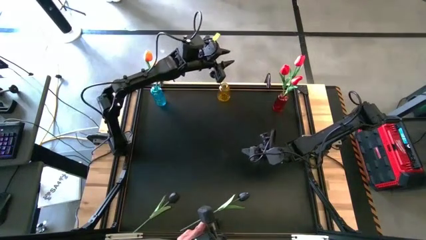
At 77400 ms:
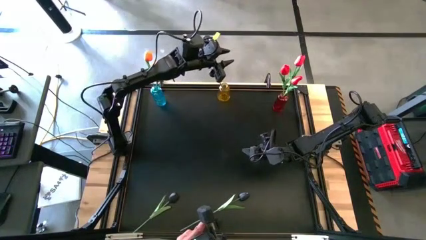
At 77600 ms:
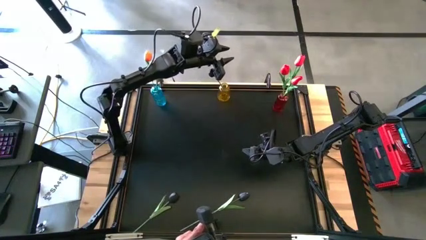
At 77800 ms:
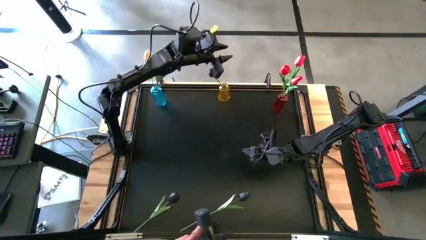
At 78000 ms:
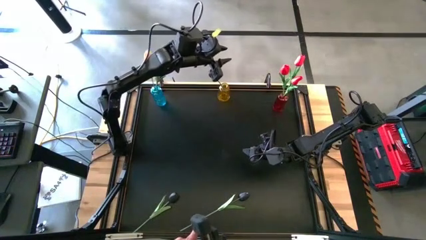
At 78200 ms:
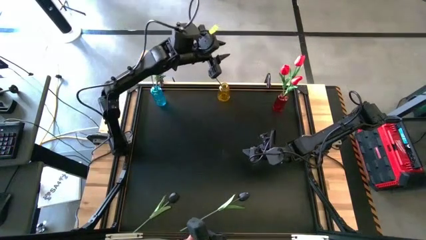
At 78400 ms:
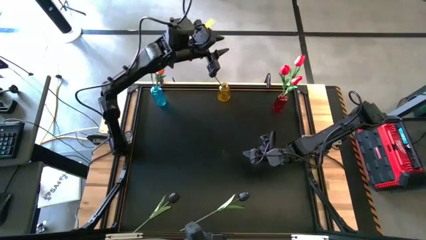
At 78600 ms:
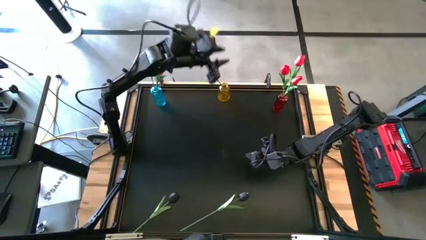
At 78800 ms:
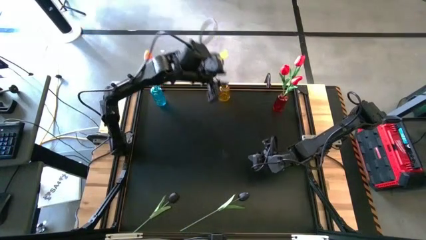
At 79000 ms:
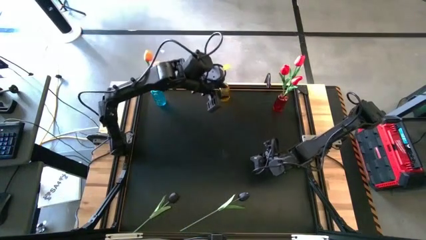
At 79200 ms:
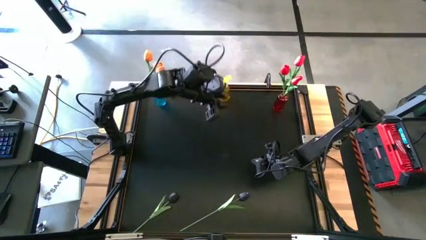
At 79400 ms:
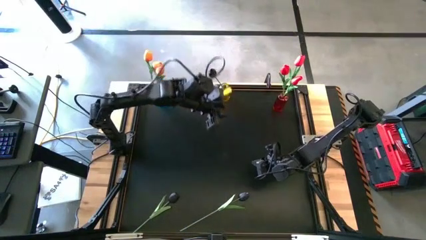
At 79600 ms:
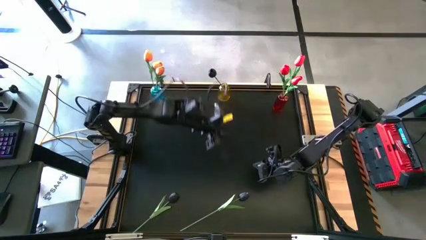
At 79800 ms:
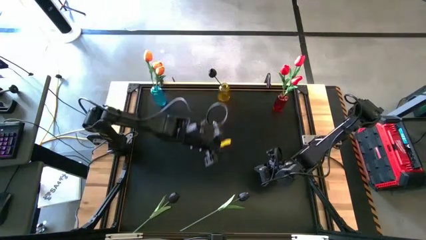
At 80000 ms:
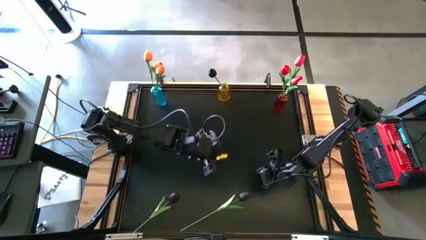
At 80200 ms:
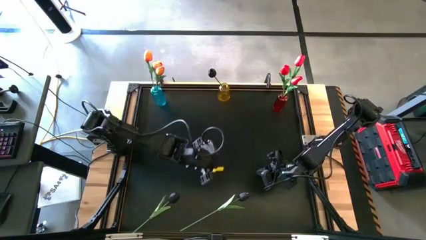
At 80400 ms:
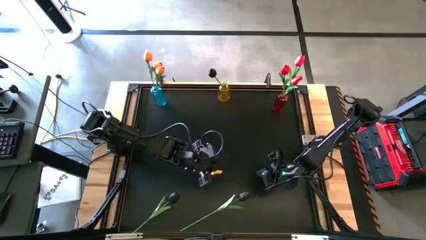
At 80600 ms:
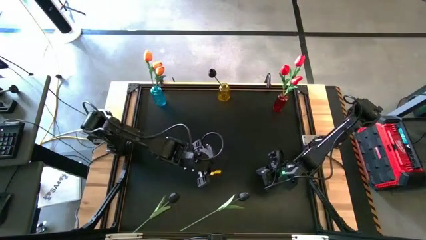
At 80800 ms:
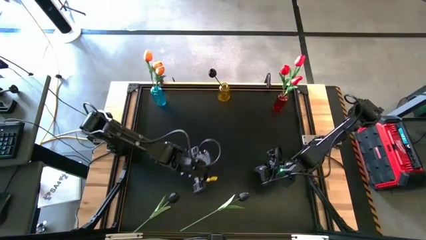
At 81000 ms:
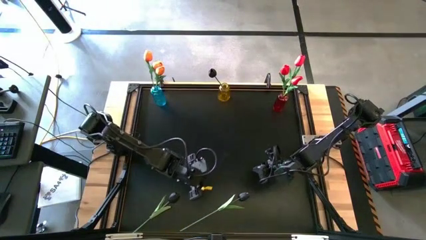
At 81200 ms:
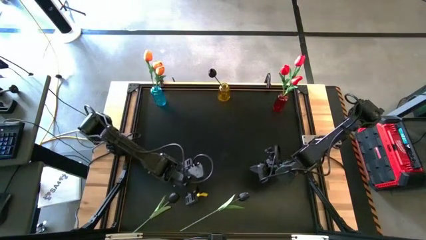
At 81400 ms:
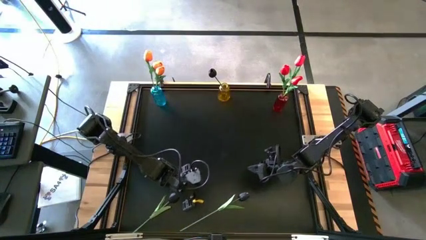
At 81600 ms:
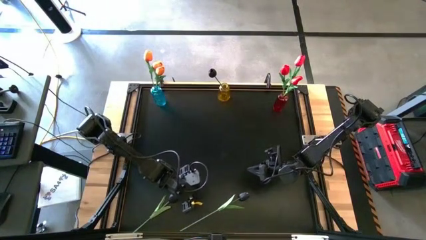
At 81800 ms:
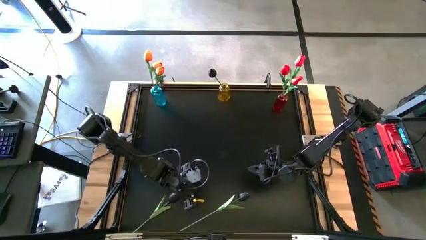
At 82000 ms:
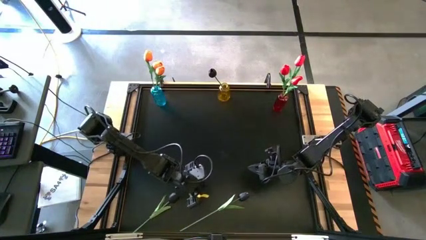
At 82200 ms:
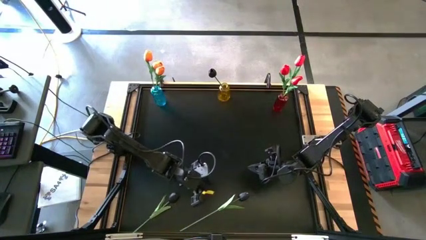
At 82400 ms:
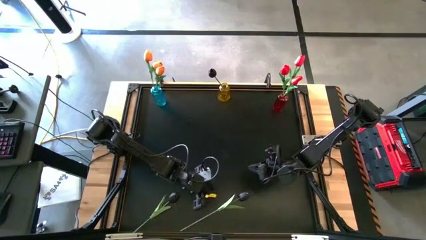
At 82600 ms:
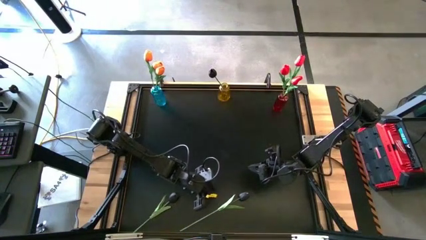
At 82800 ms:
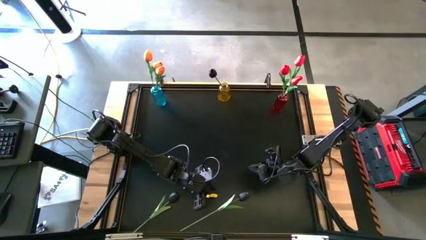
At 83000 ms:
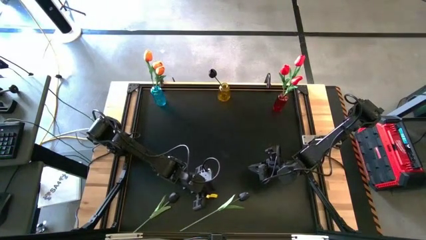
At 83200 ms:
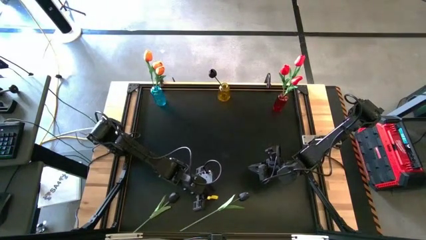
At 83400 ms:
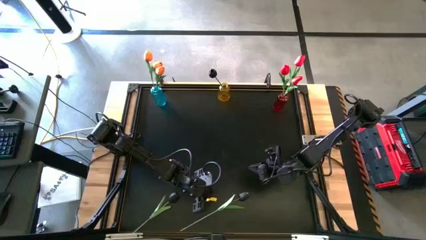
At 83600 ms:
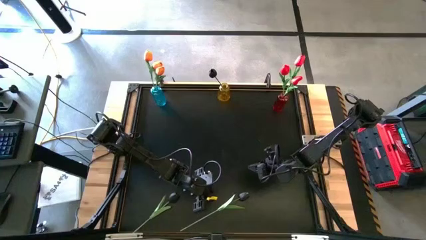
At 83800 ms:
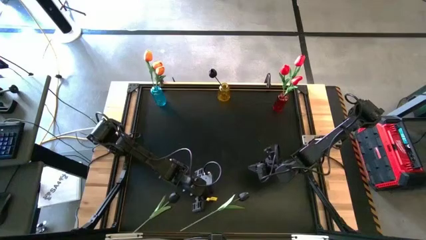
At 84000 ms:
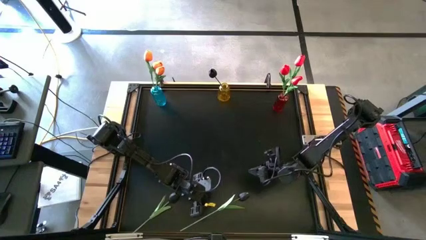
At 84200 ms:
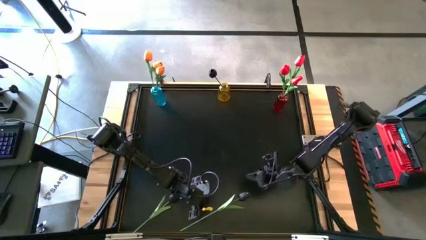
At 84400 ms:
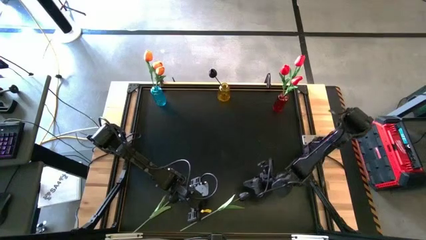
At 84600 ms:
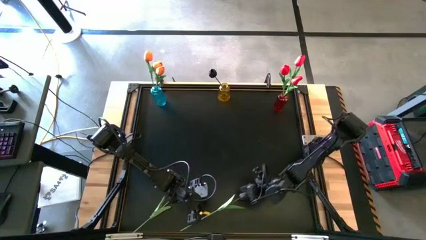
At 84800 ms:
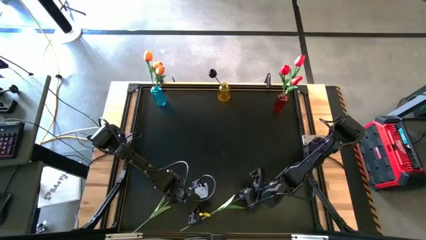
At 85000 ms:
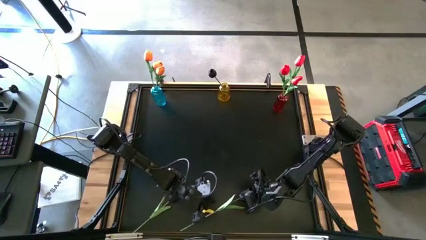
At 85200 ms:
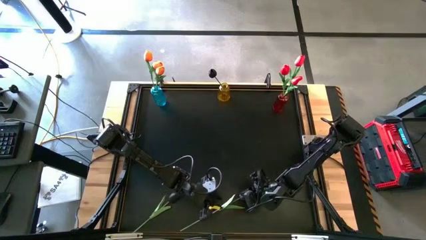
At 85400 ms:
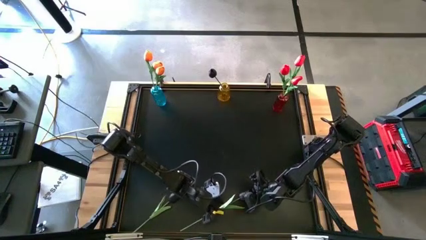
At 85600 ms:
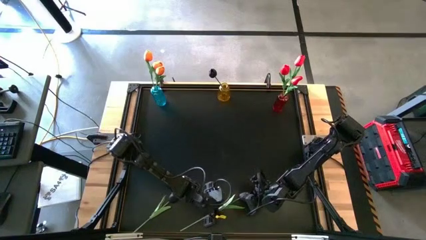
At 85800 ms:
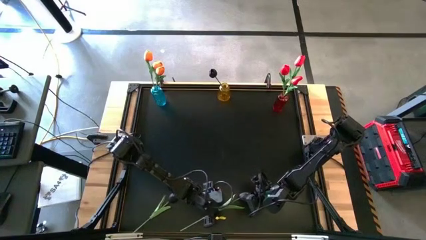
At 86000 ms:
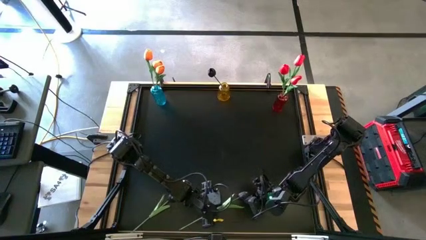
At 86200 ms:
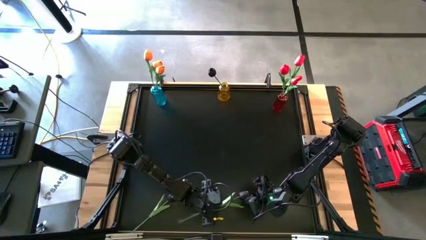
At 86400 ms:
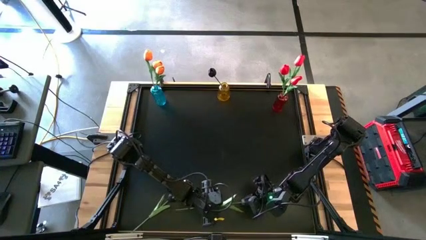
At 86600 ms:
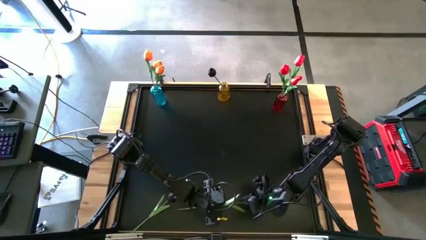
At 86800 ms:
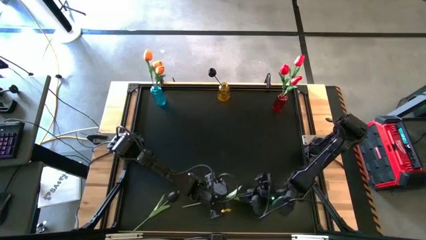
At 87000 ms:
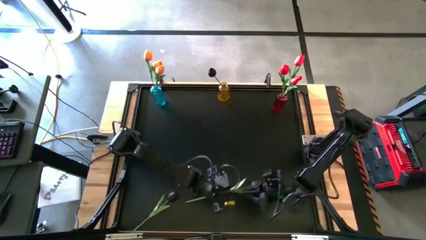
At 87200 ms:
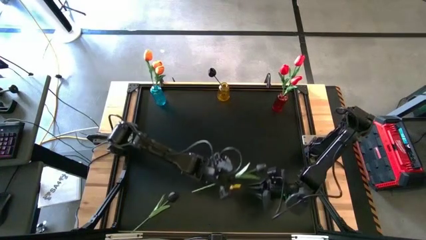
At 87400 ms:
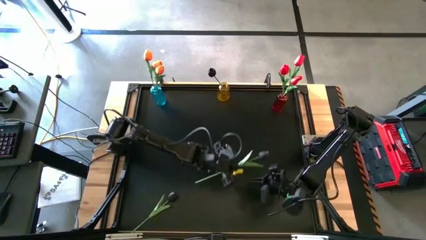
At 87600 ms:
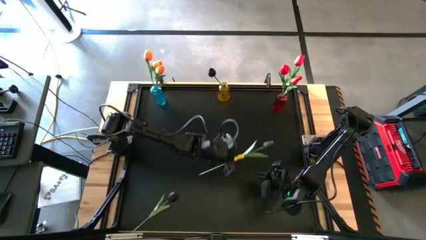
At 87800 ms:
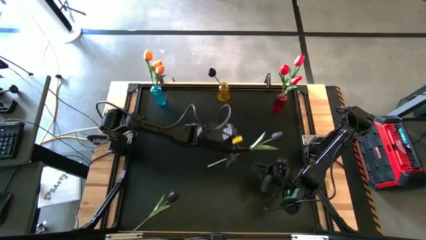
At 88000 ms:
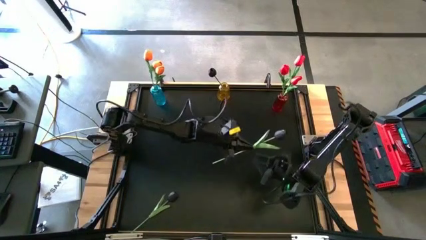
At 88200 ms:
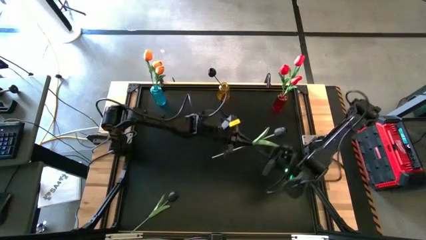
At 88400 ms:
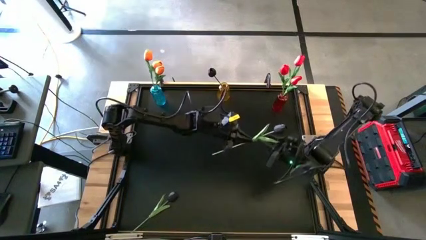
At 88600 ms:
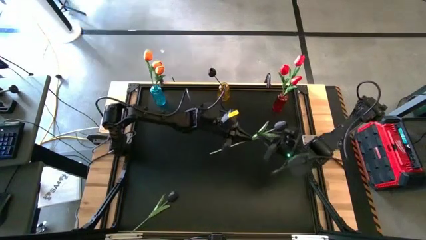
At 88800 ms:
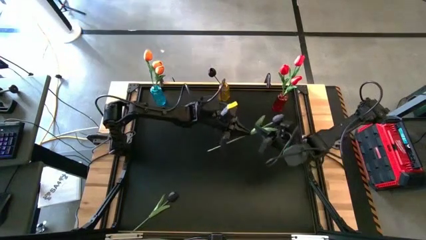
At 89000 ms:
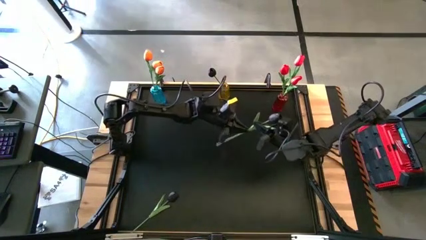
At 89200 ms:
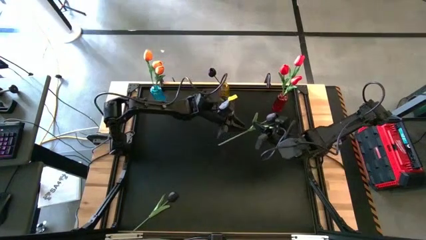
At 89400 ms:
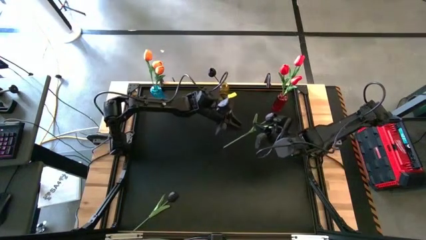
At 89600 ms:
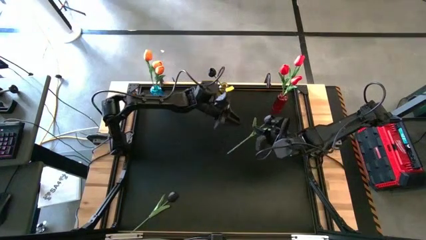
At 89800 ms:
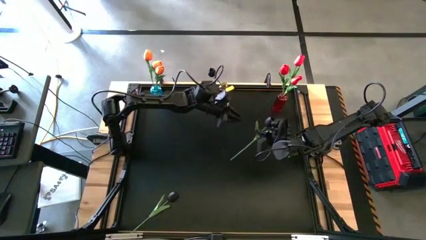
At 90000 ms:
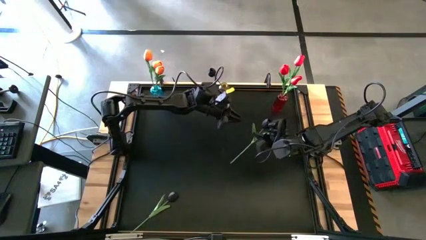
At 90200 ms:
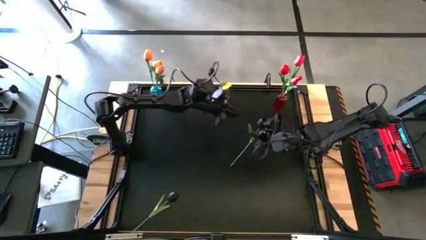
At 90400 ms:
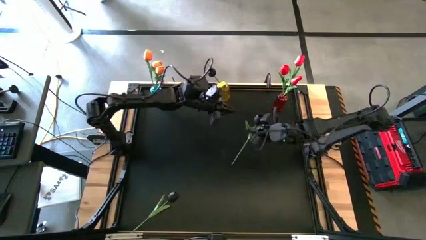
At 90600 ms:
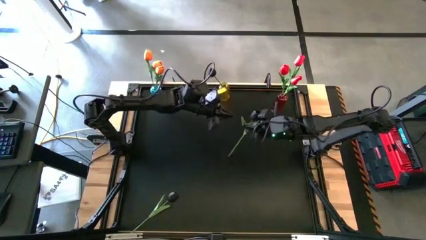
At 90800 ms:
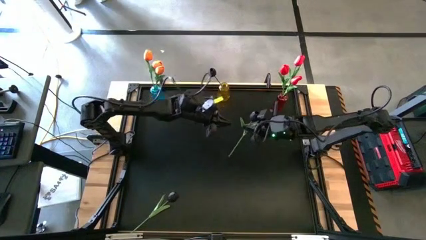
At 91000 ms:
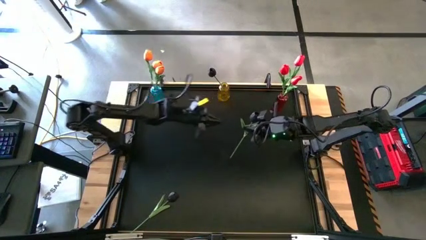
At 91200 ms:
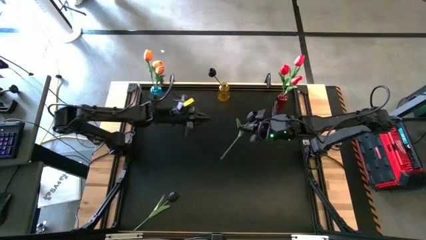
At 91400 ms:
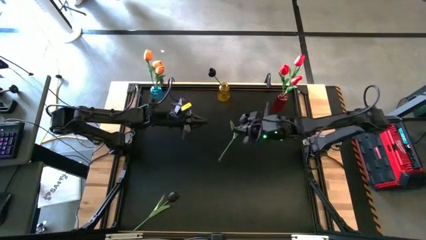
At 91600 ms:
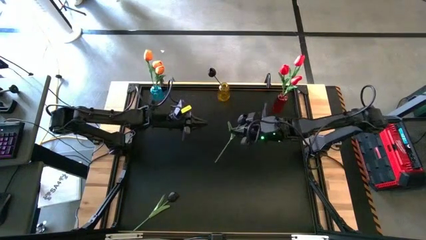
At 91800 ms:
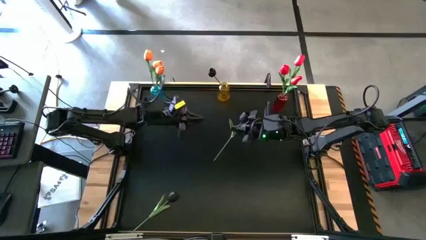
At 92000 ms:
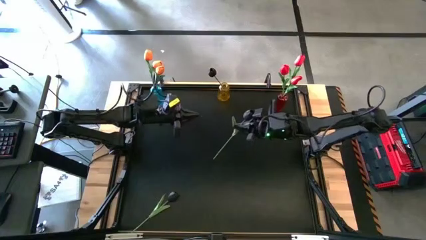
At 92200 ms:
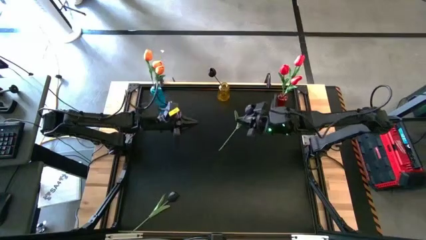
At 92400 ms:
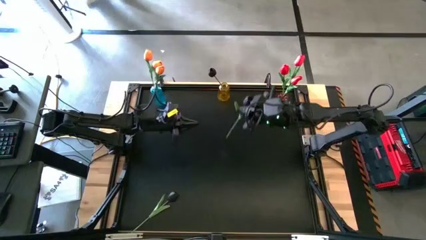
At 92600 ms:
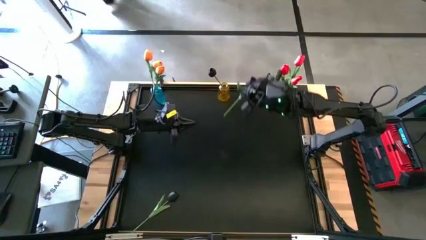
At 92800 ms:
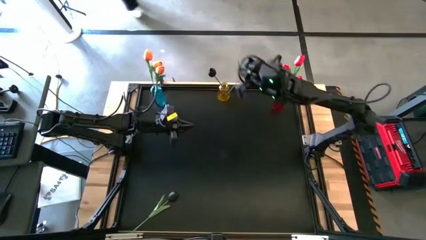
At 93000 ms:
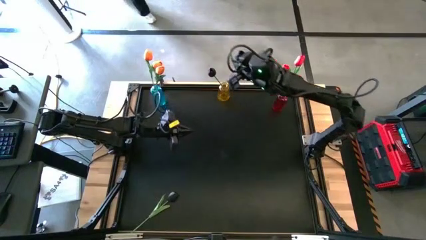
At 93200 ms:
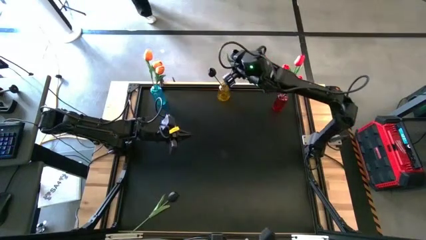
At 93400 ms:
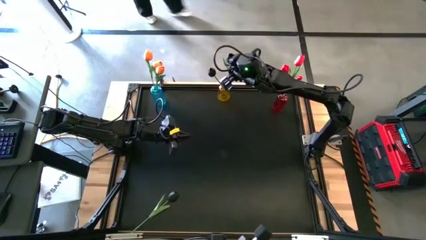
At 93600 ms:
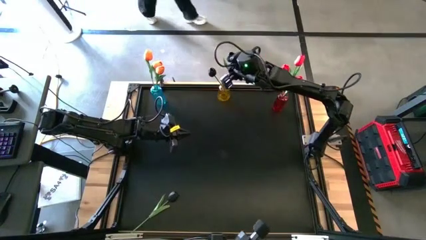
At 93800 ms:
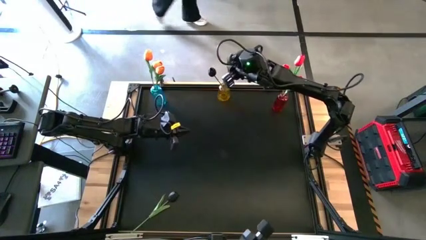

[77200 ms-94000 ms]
Task: Sort flowers into vase by color
Put the right black flower into the yellow vase
